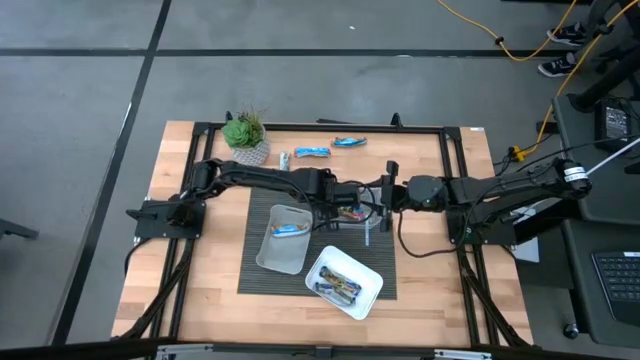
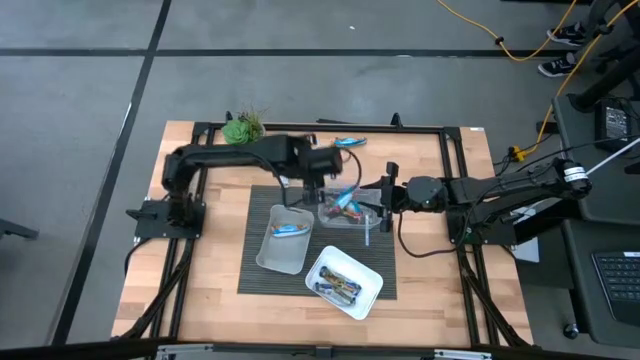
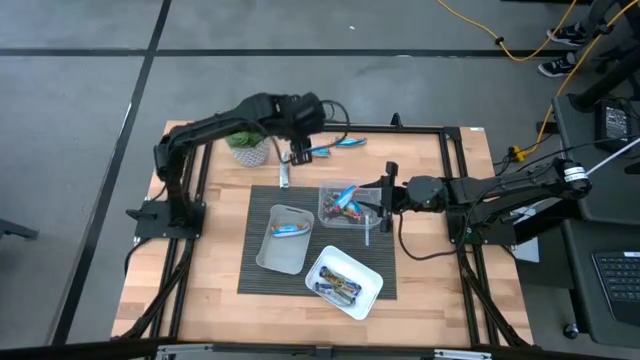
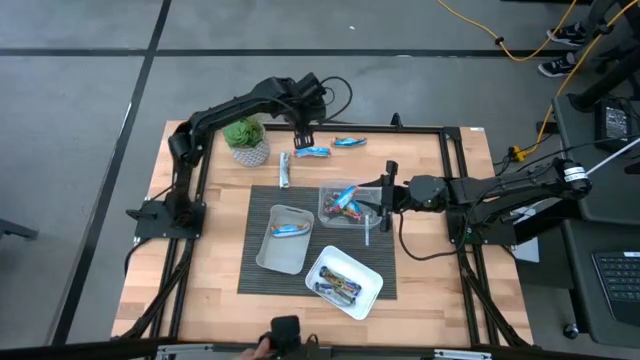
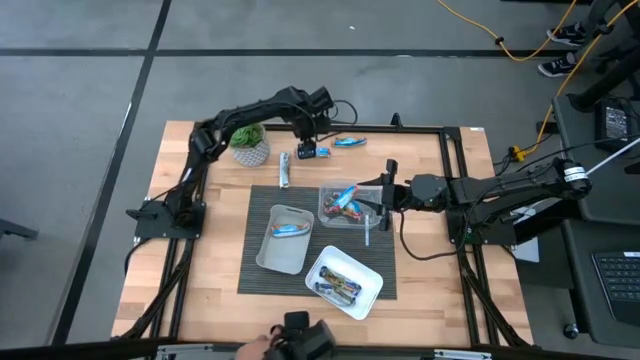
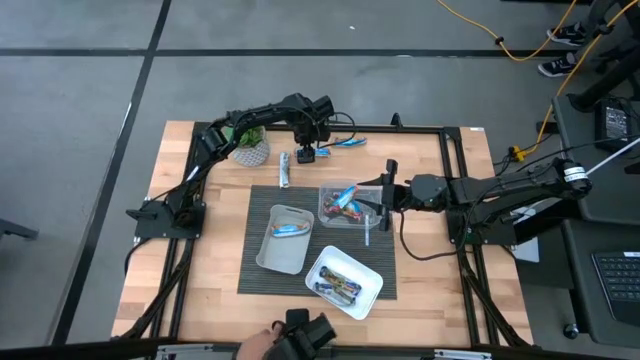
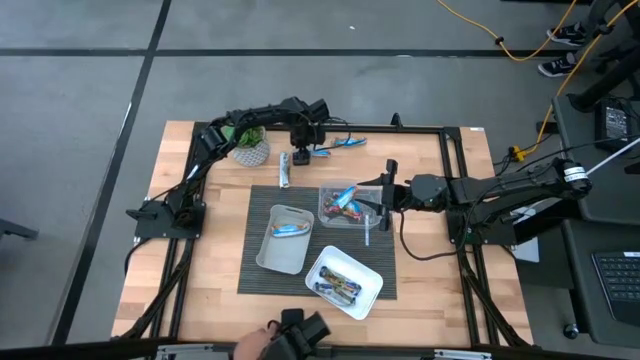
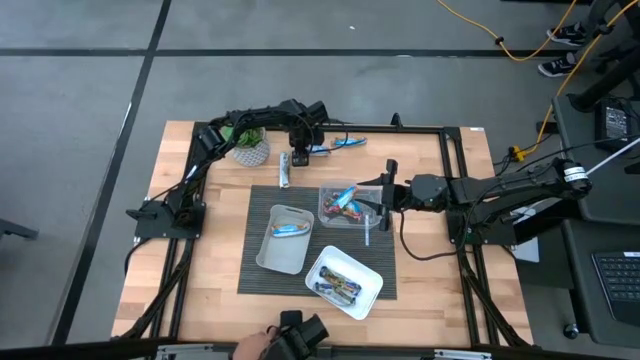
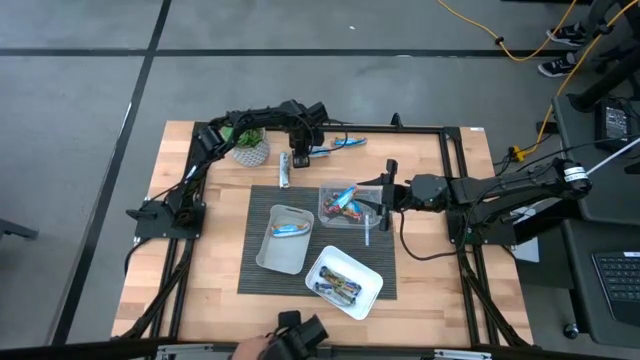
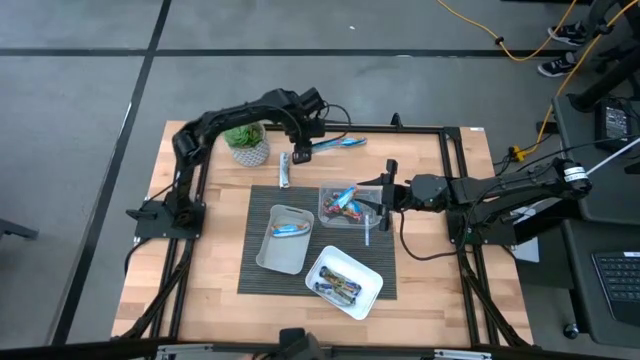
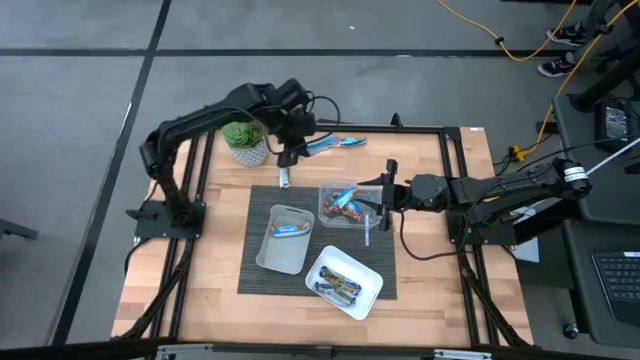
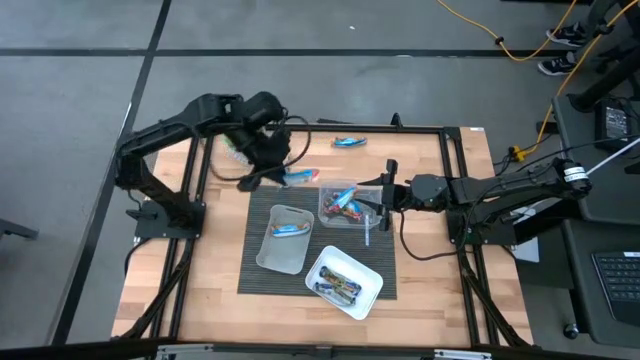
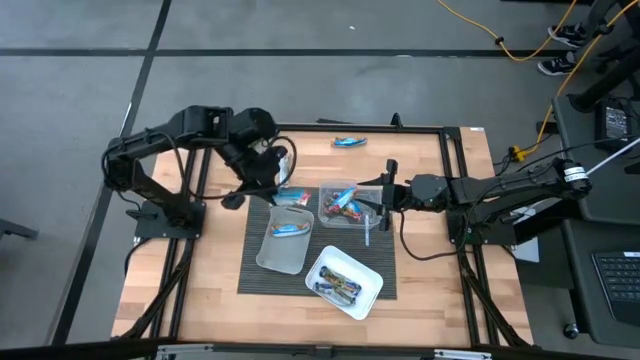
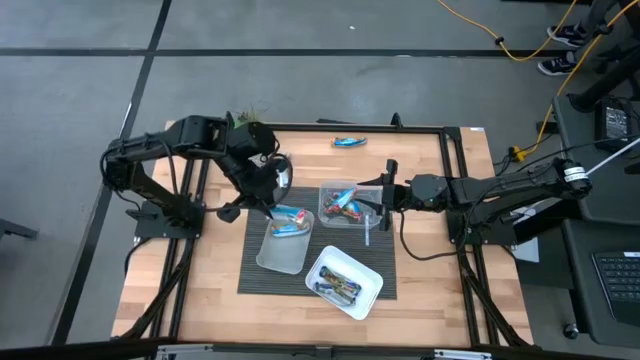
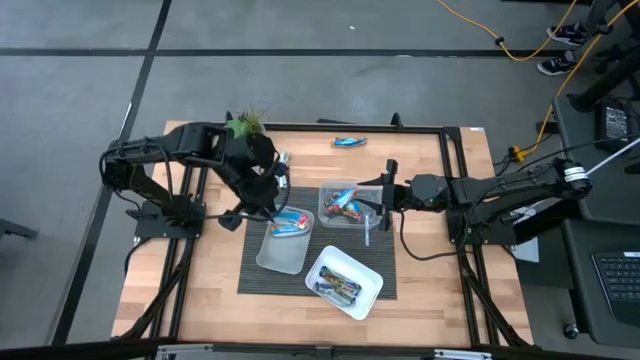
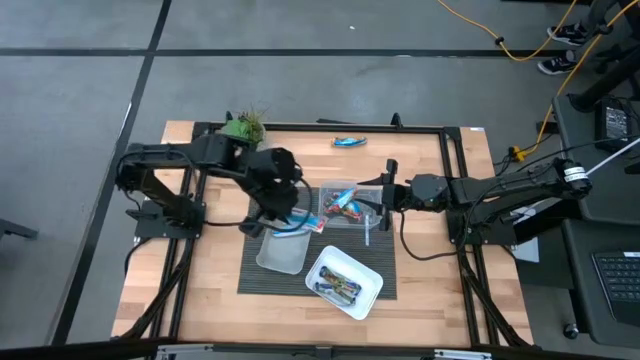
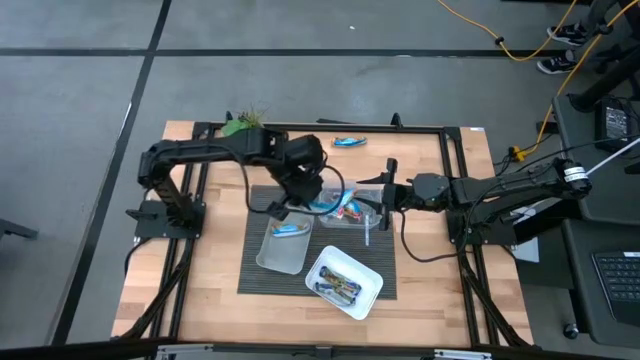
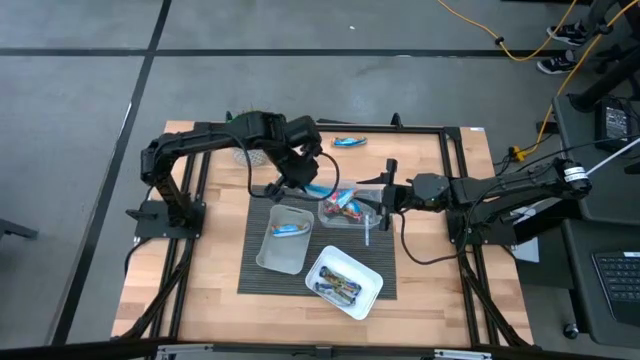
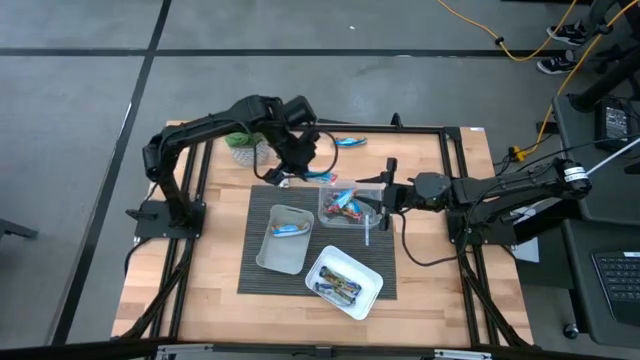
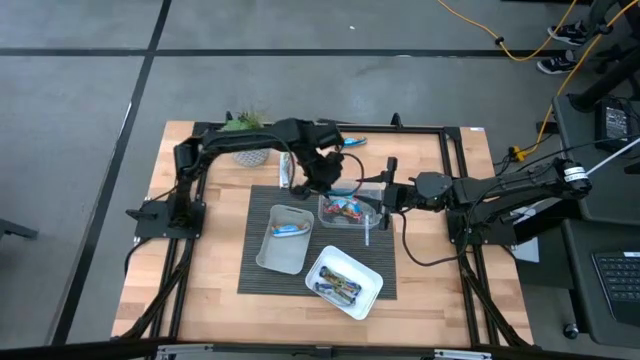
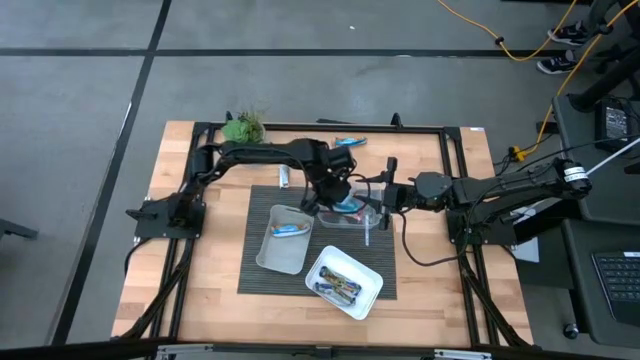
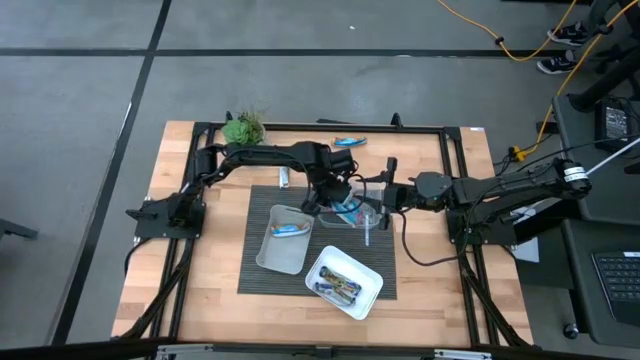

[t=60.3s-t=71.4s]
Task: Pick and place Granola Bars by type
Put the red granola bar into the transparent bin

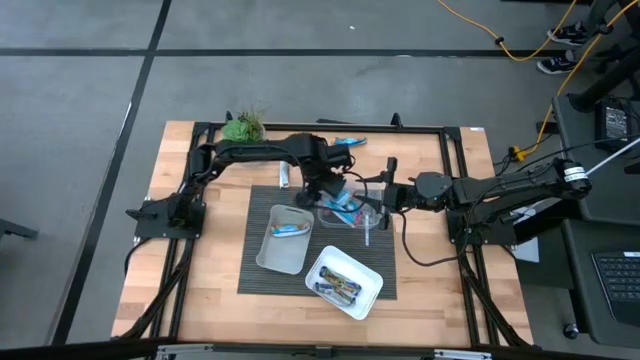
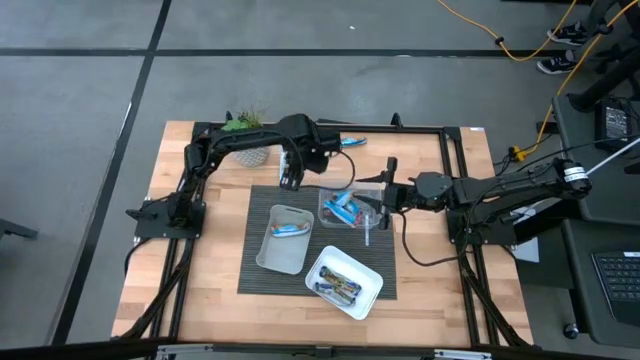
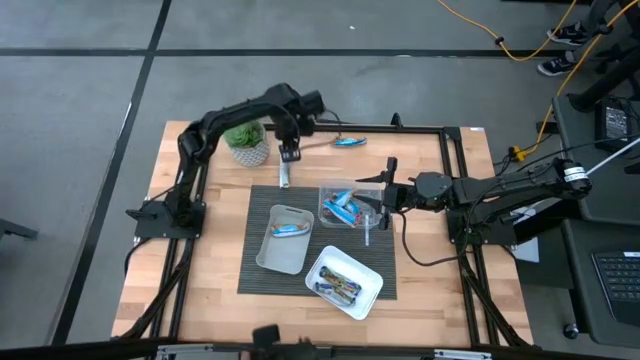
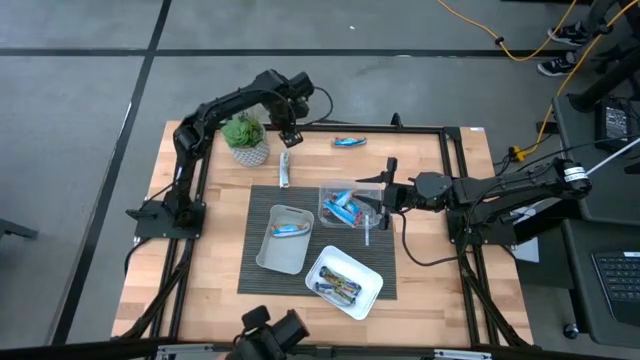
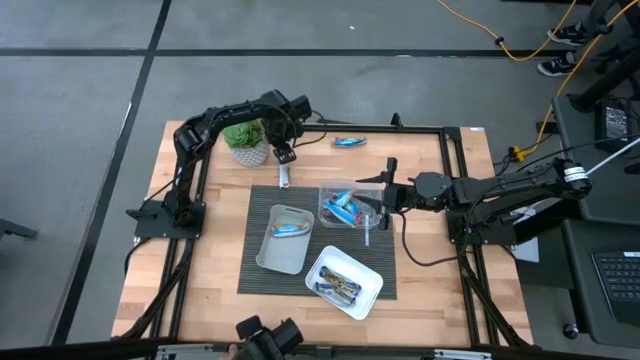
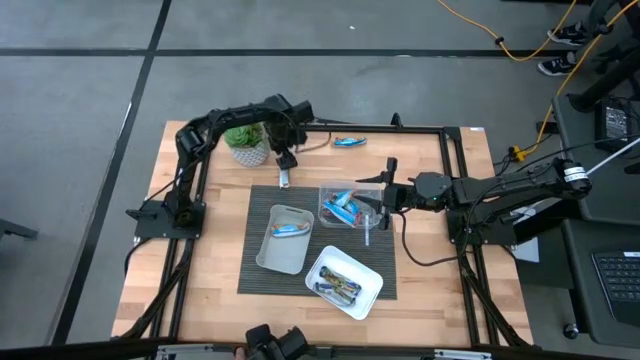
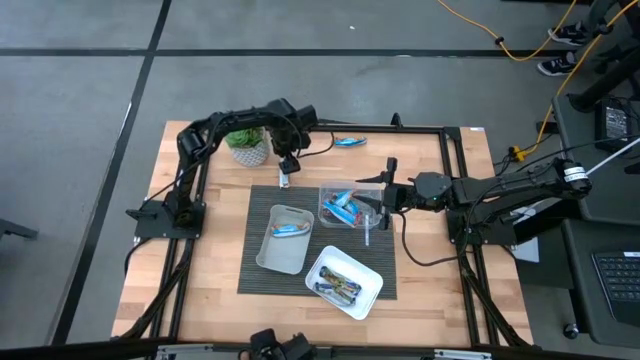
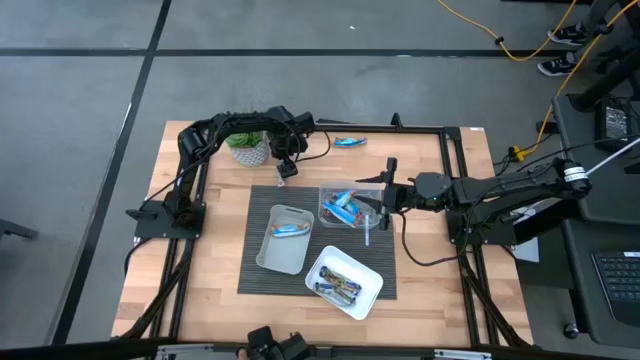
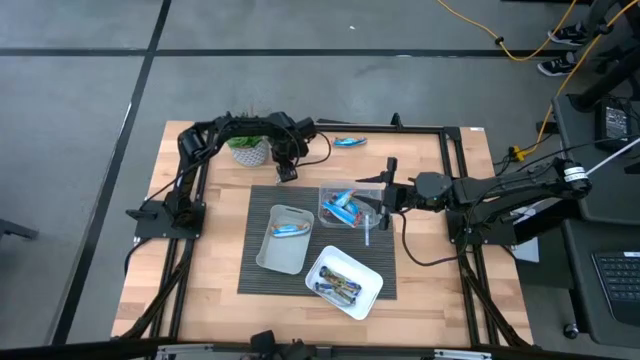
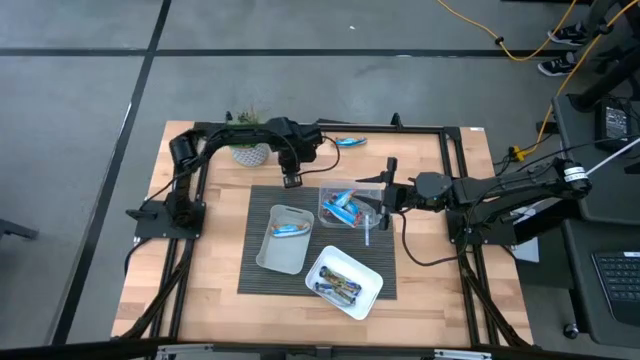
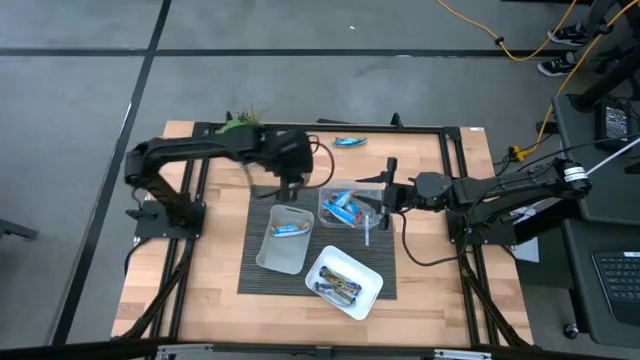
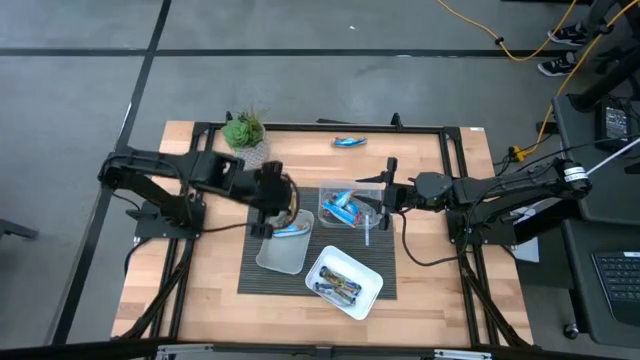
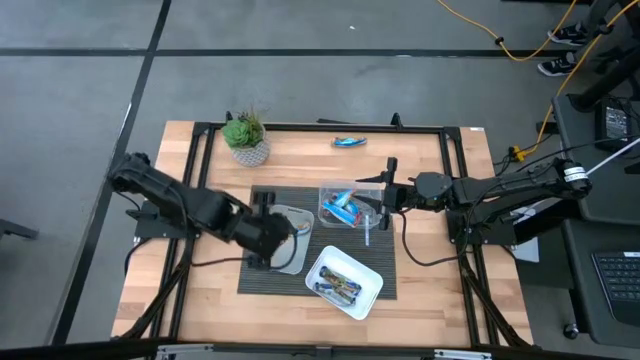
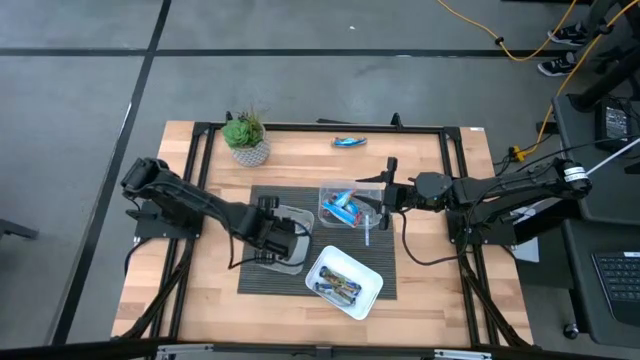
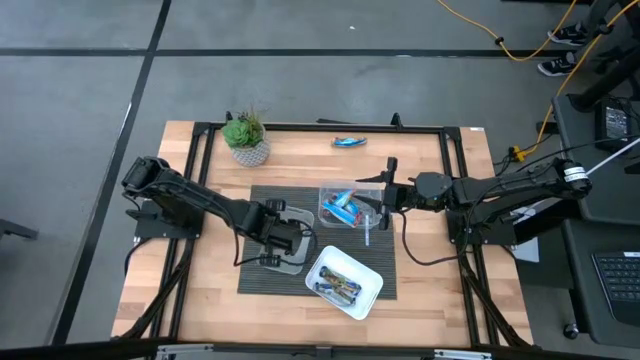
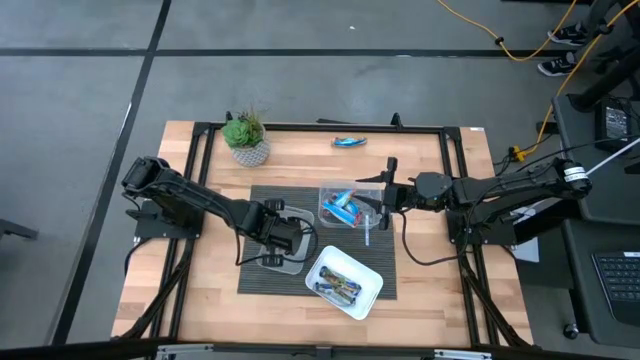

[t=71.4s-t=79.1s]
Put the orange granola bar into the gray bin

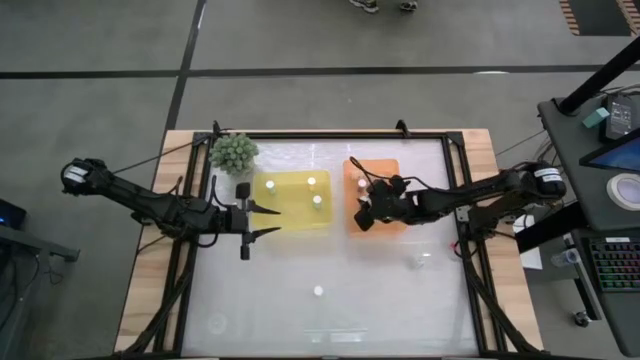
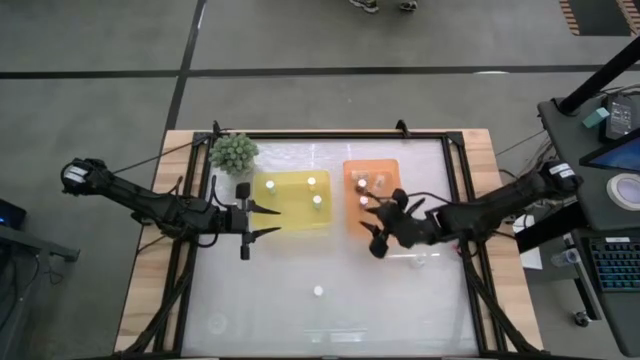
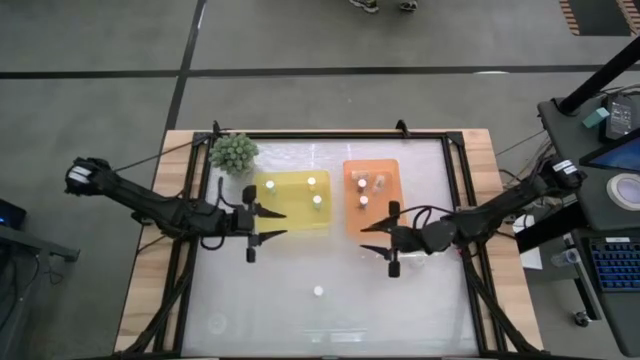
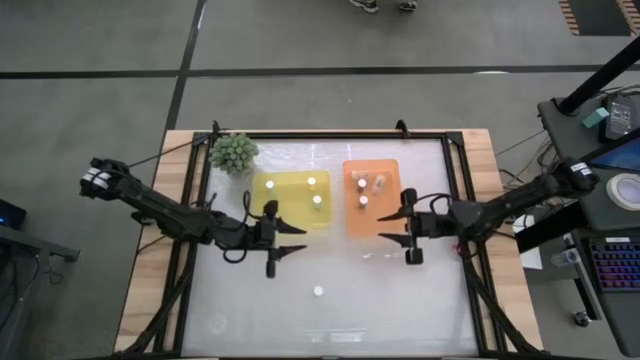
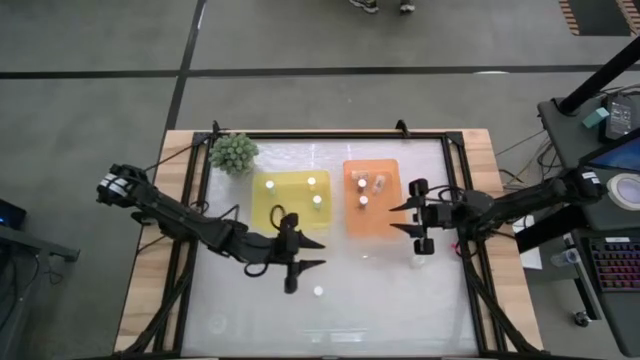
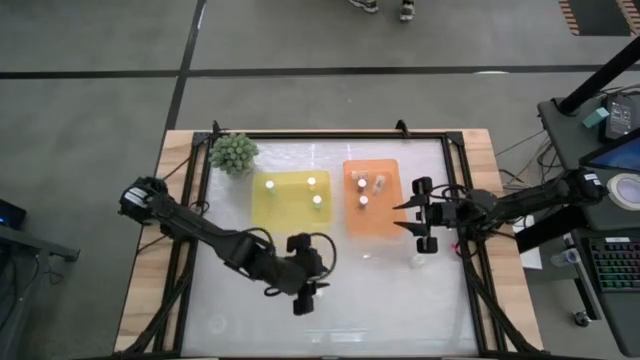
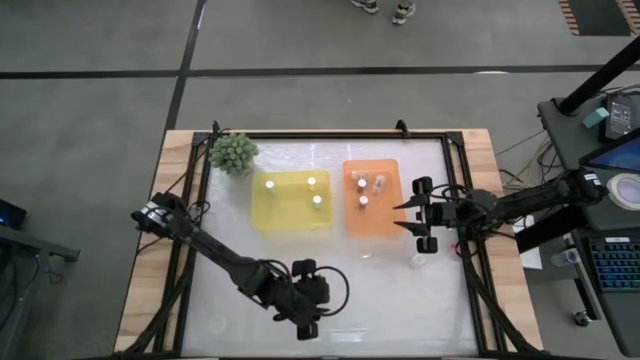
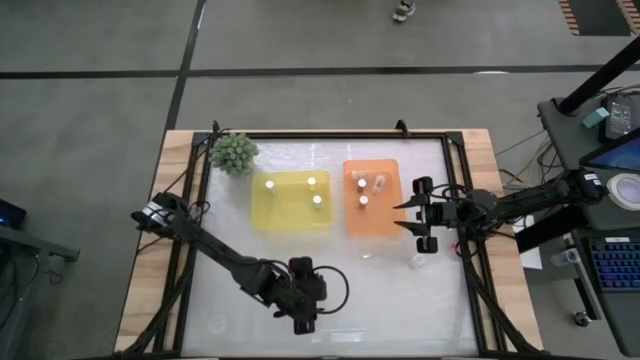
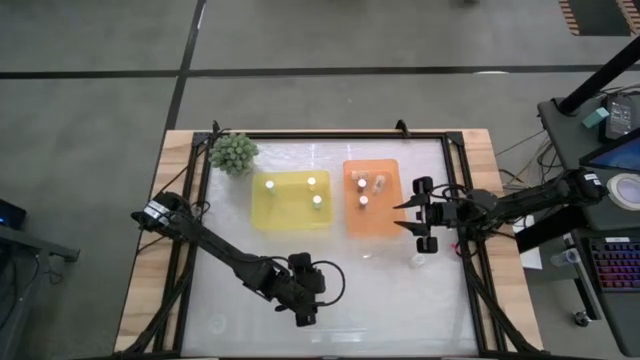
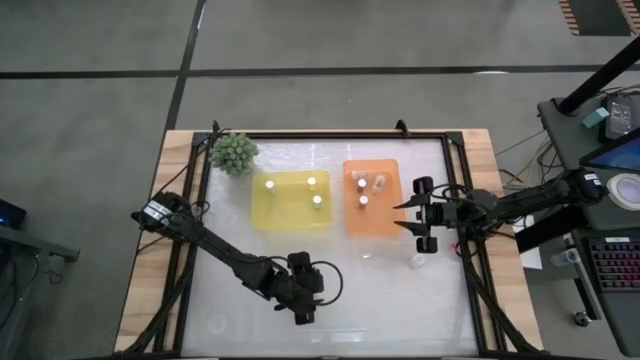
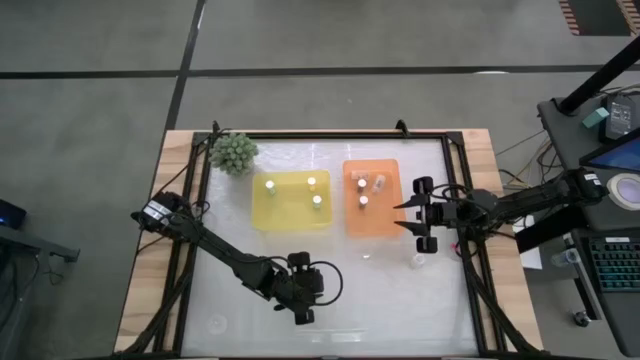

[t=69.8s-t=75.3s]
Task: Pick and place medicine bottles into bin by pill shape (circle, oval)
Put the yellow pill bottle into the yellow bin
